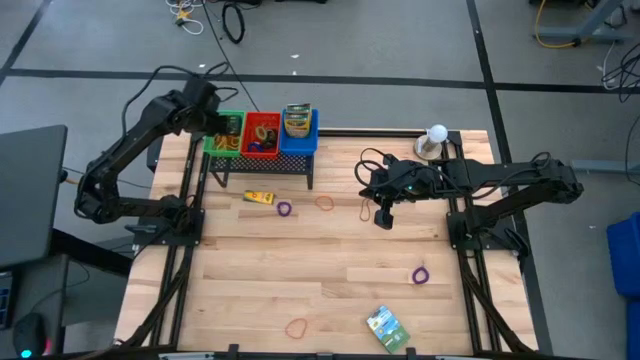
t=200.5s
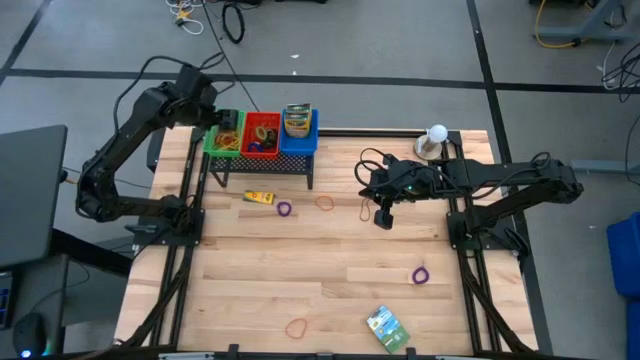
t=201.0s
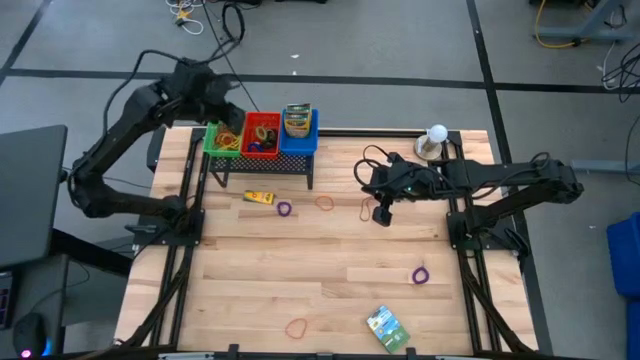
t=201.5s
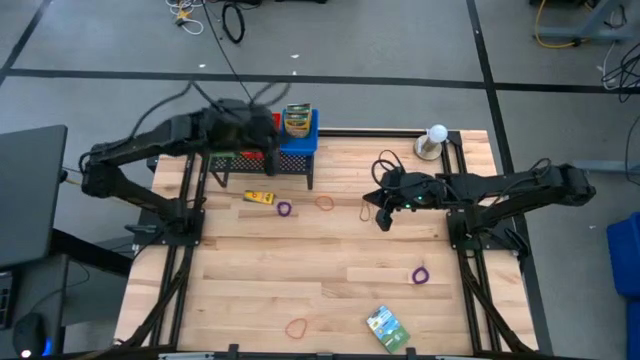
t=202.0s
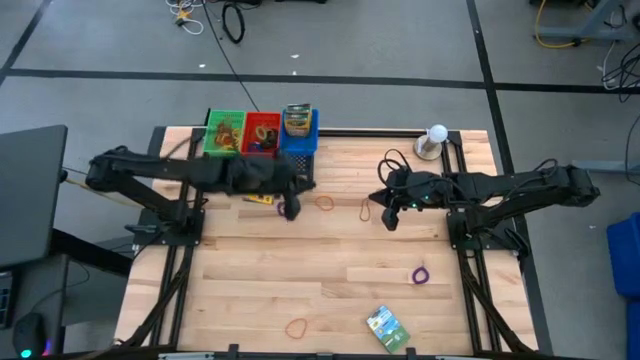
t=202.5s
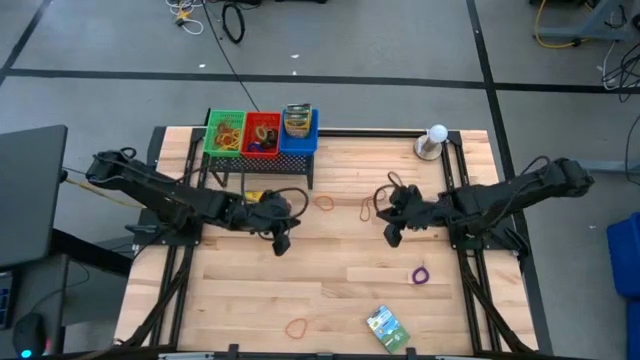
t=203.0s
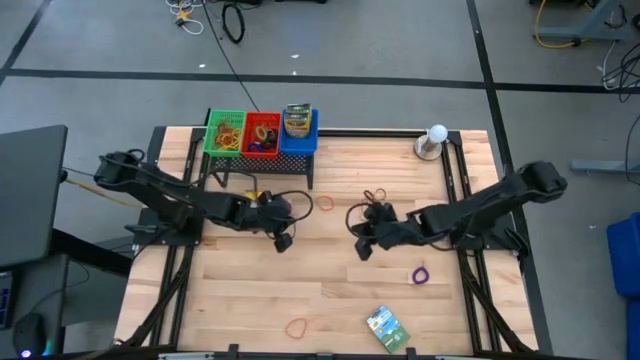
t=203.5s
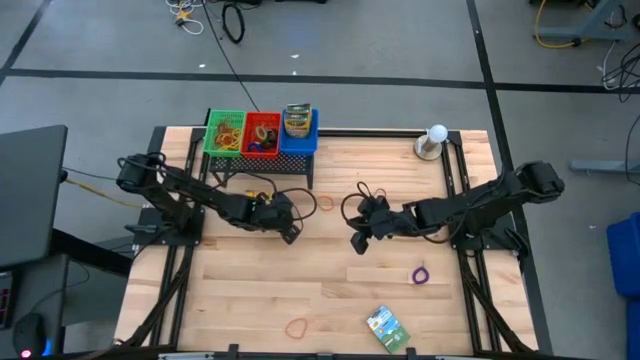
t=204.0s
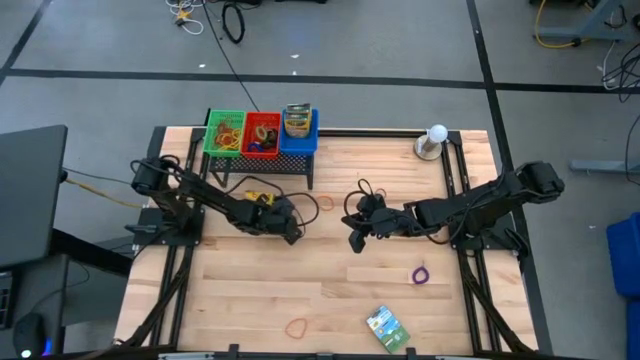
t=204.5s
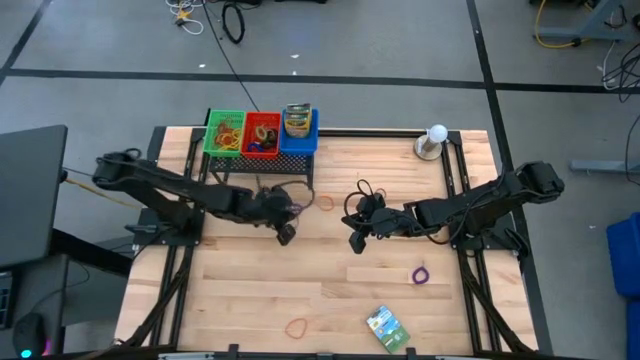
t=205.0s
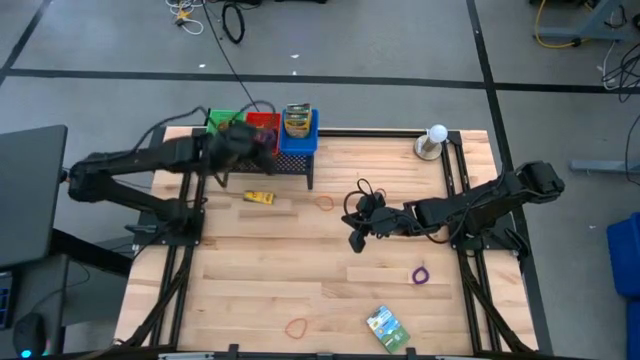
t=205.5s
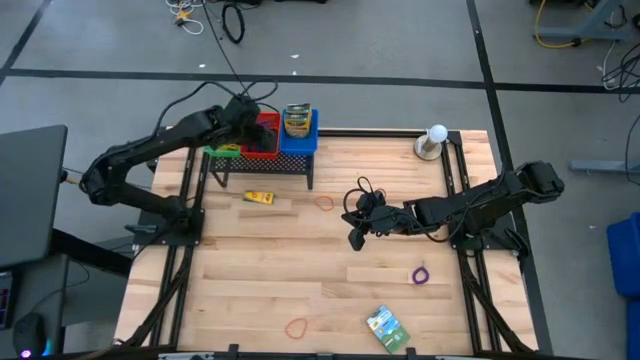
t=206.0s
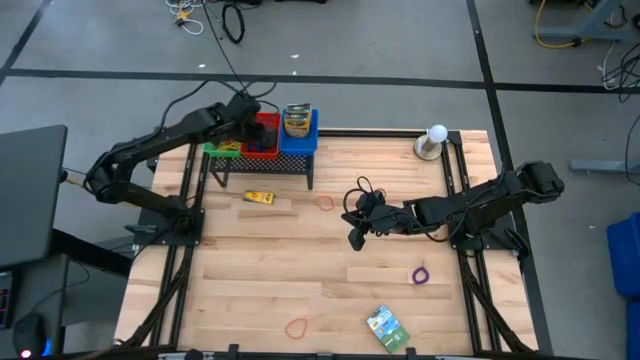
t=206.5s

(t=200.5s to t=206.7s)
Task: Pick & Place Office Desk Supplies
Put the violet spring rubber band into the red bin on the shelf

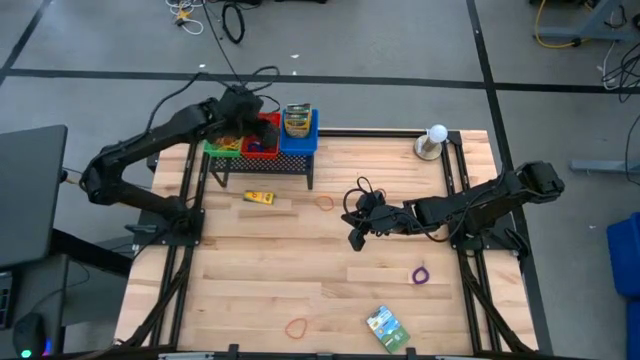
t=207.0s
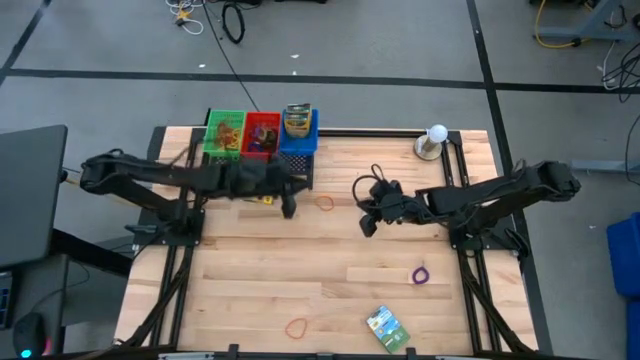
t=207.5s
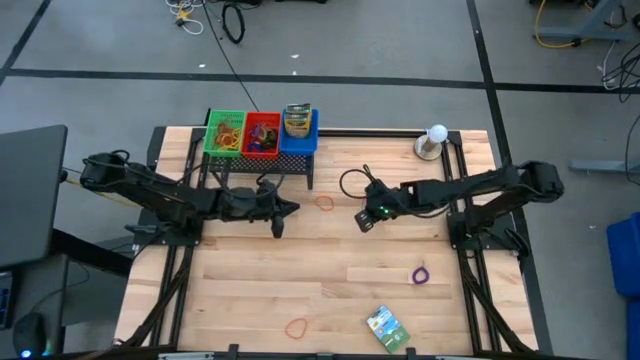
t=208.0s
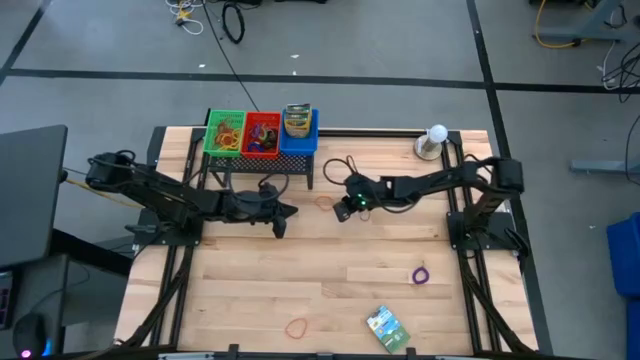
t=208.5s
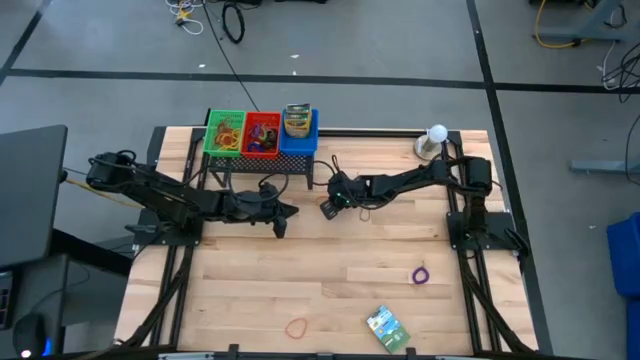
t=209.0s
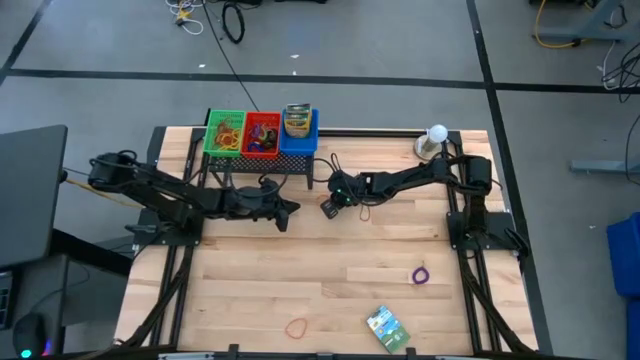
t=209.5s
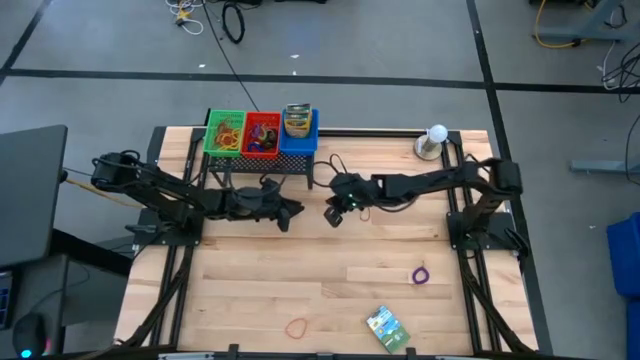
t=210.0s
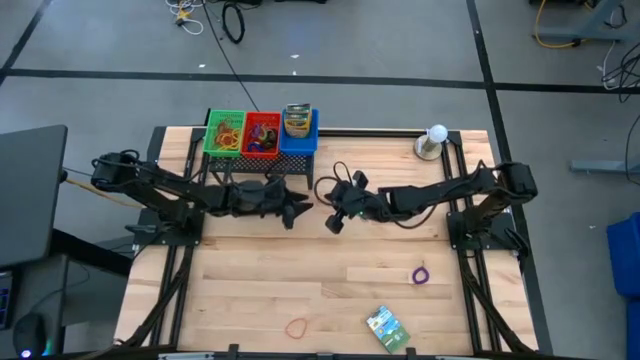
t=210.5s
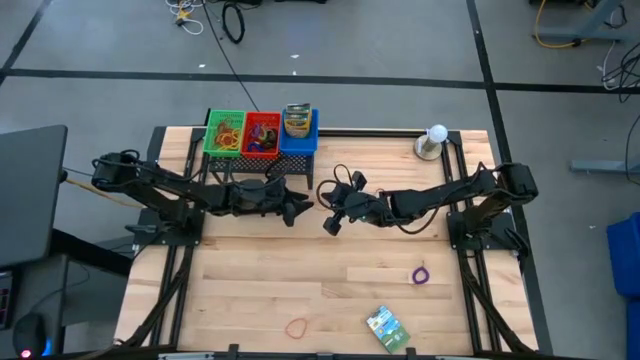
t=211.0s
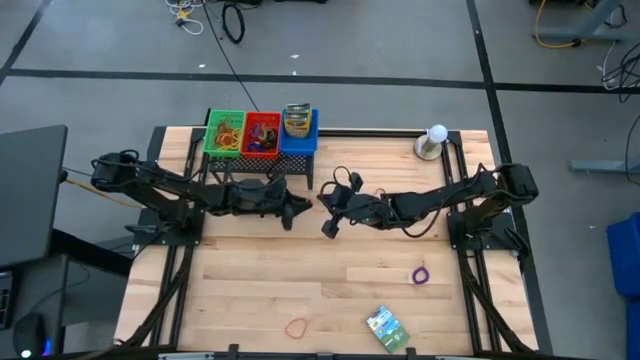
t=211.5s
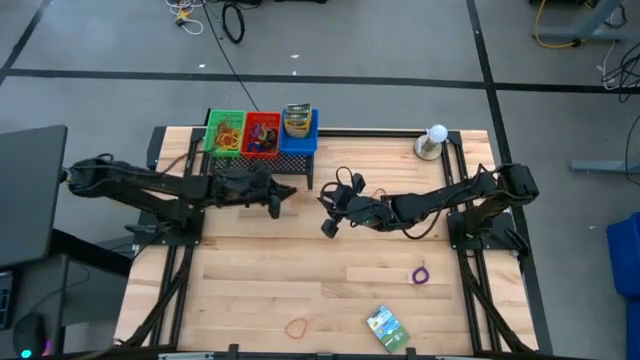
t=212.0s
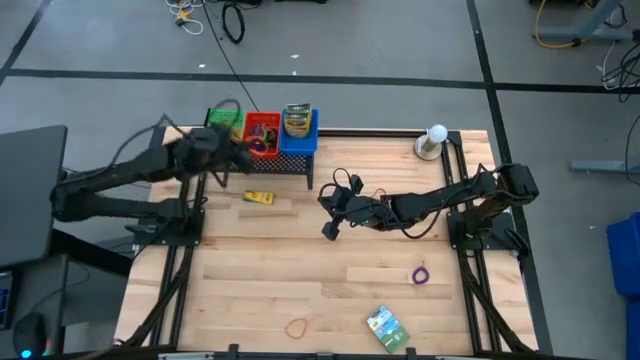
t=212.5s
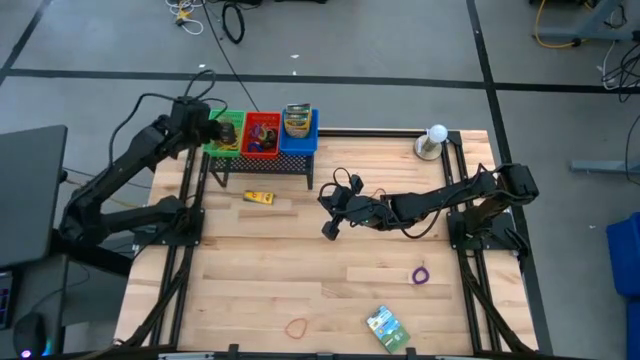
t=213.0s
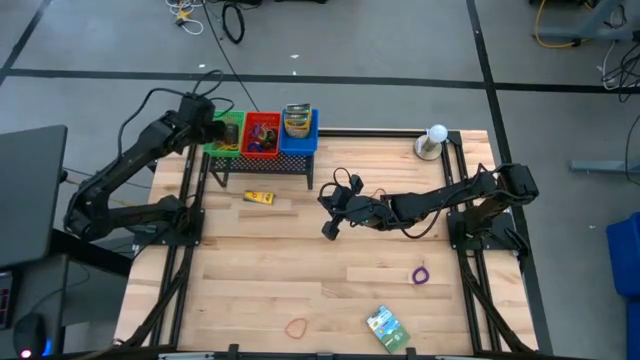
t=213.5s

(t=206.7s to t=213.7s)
Put the orange rubber band into the green bin on the shelf

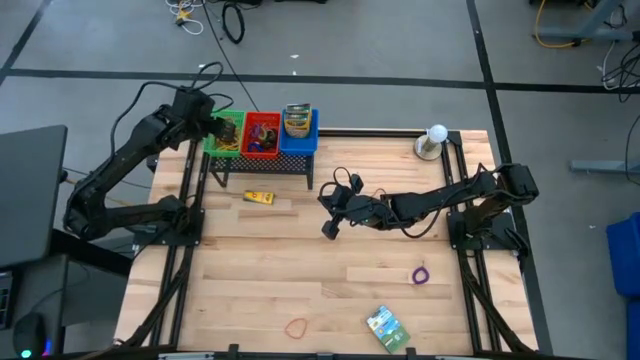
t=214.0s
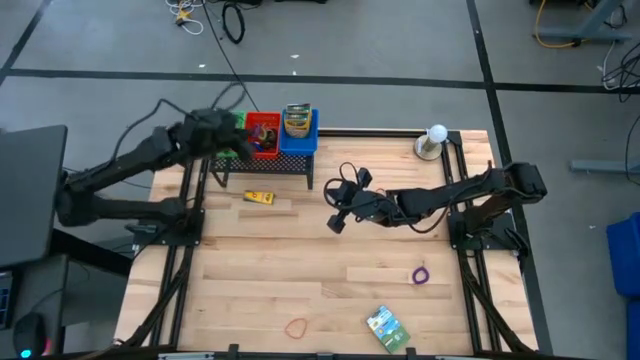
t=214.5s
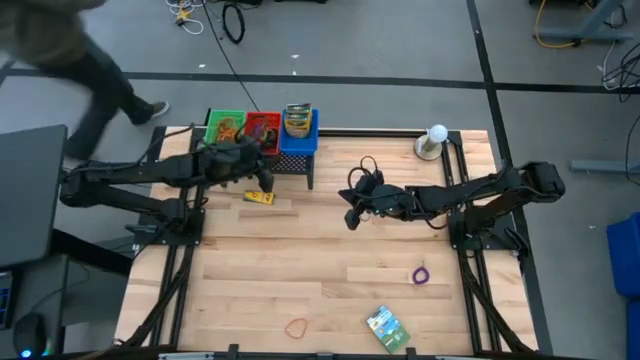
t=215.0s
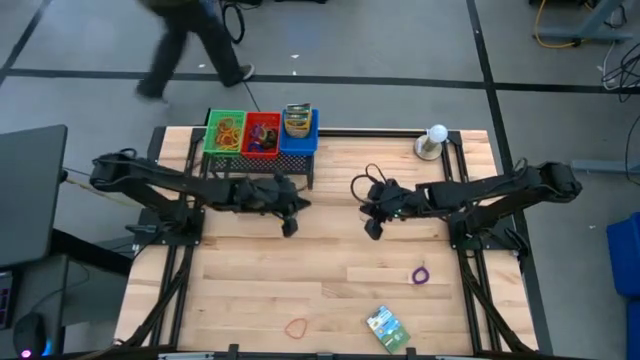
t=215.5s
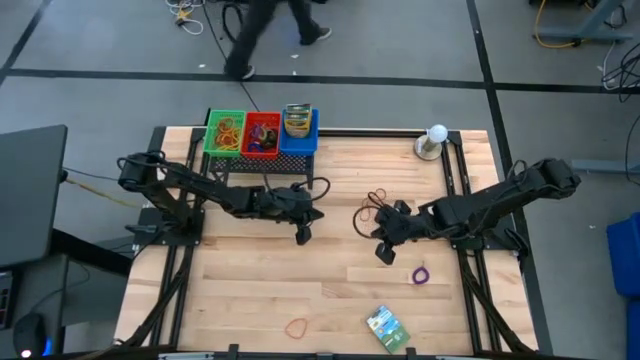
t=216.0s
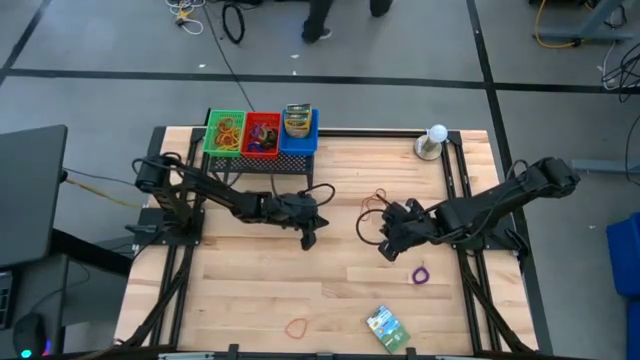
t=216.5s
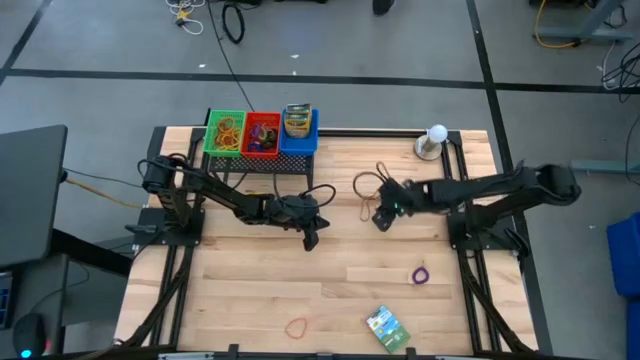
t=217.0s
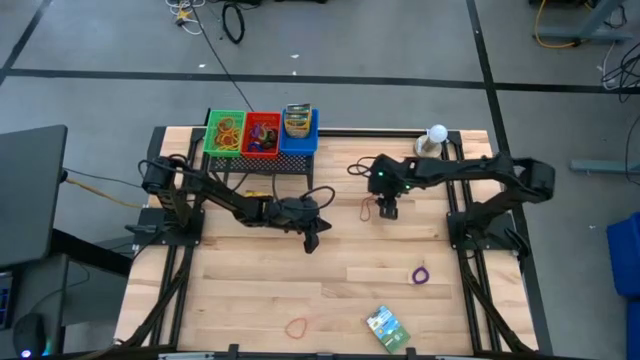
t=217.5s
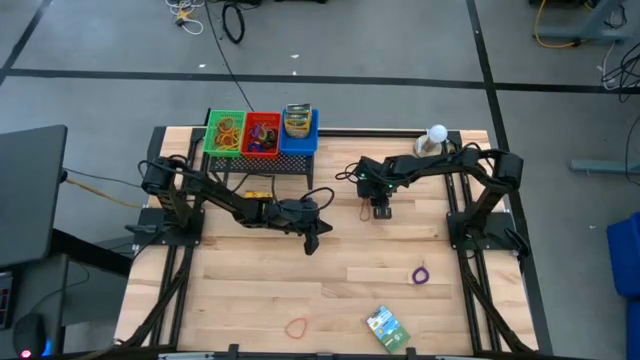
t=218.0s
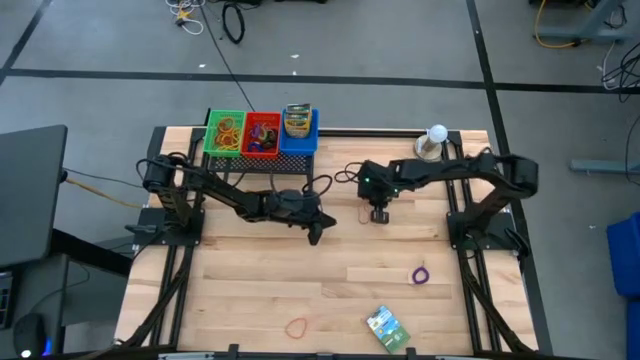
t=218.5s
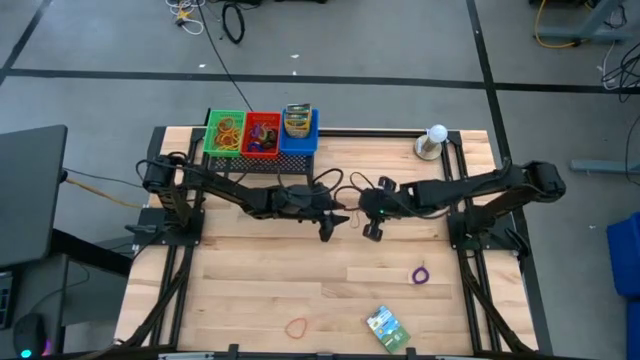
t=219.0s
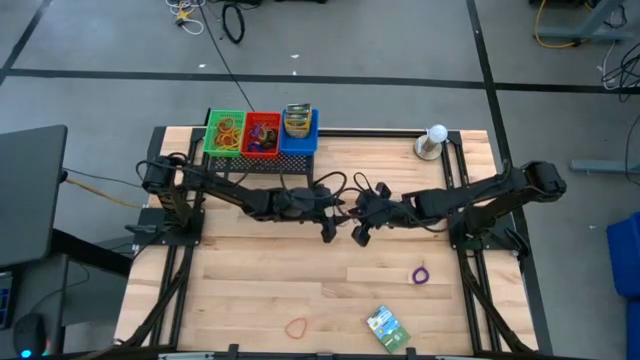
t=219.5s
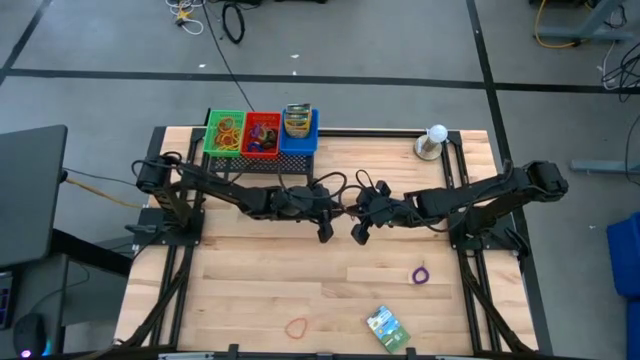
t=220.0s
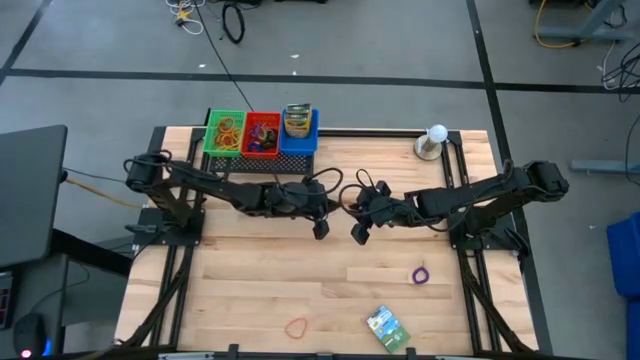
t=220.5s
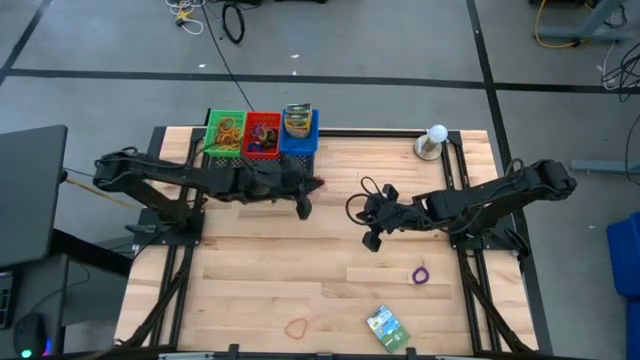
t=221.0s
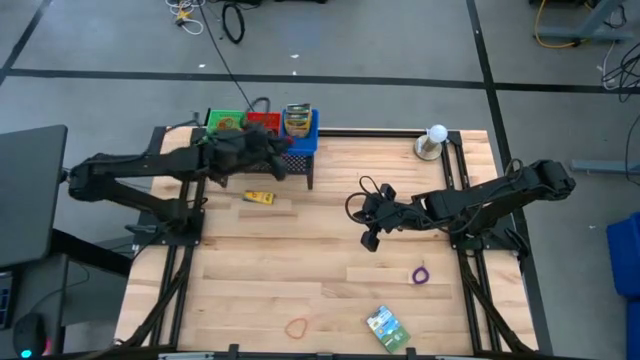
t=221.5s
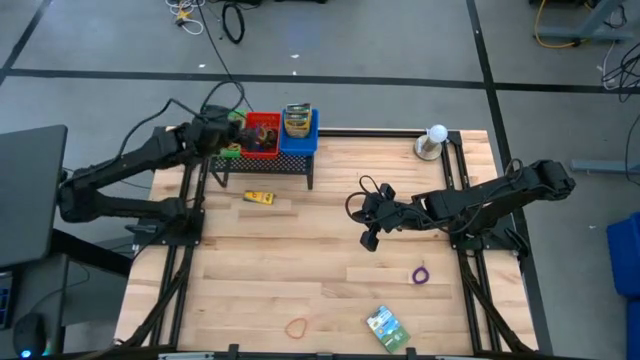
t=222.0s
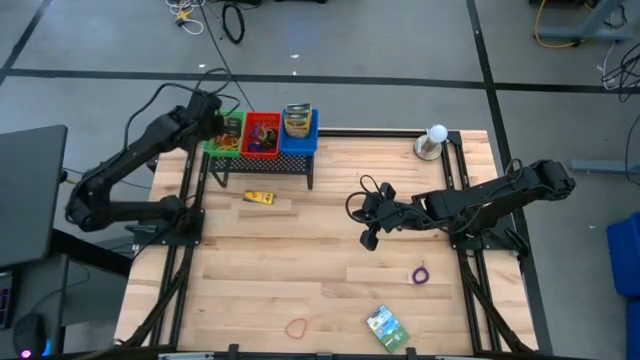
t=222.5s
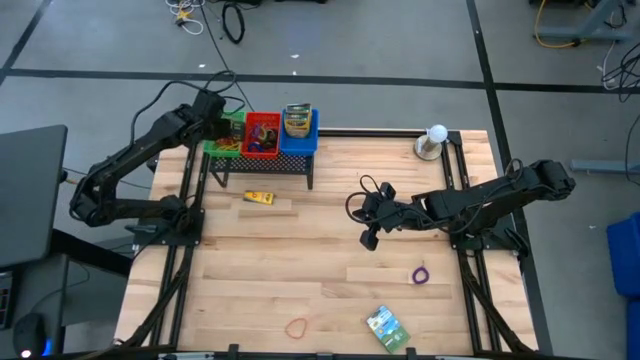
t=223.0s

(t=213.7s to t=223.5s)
Put the red rubber band into the green bin on the shelf
